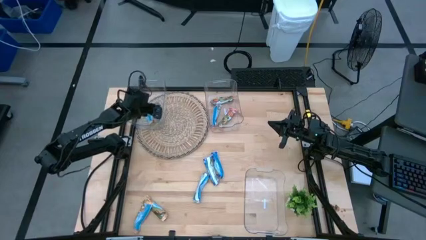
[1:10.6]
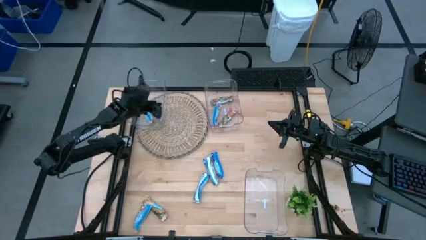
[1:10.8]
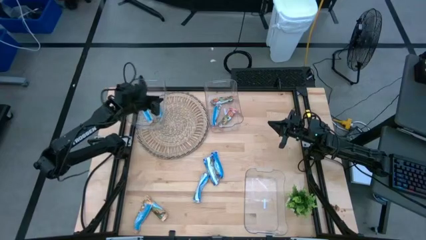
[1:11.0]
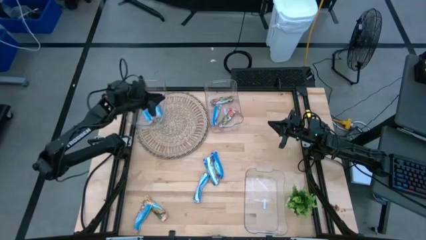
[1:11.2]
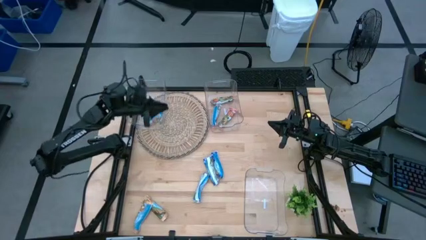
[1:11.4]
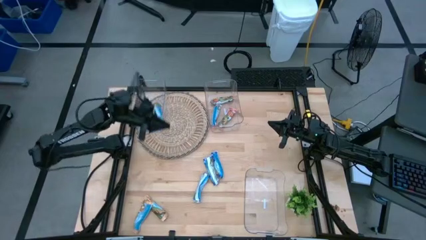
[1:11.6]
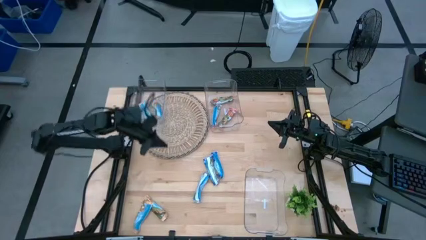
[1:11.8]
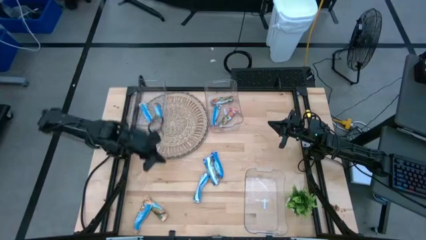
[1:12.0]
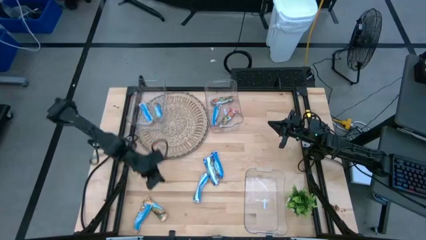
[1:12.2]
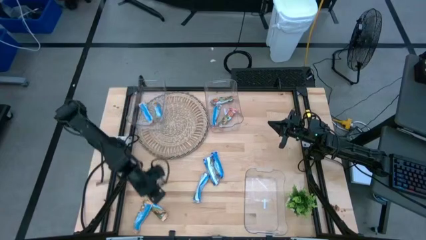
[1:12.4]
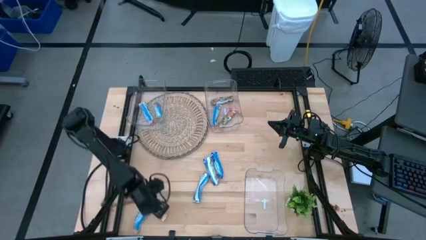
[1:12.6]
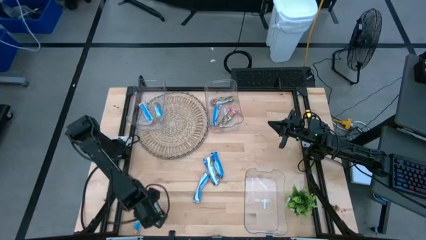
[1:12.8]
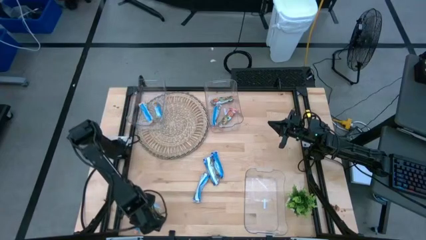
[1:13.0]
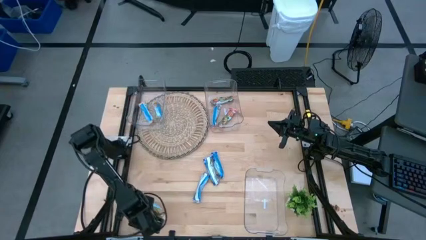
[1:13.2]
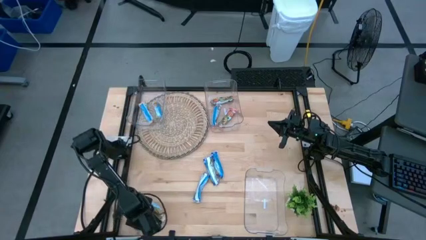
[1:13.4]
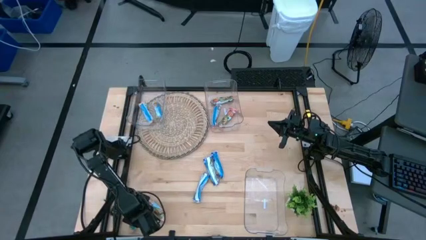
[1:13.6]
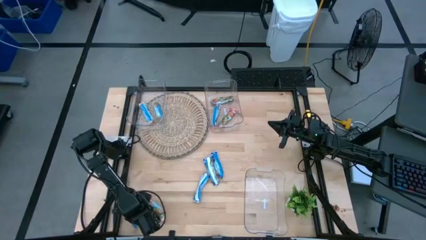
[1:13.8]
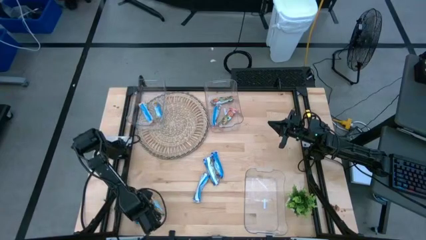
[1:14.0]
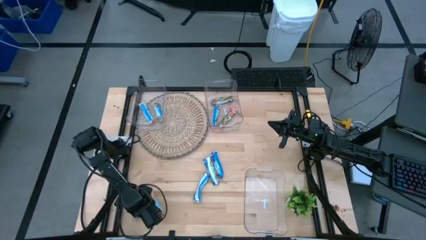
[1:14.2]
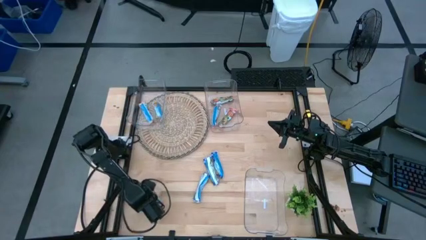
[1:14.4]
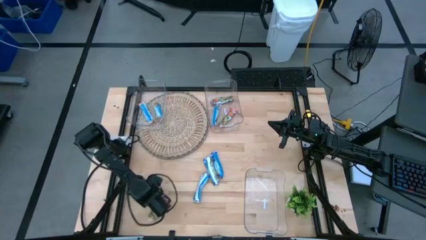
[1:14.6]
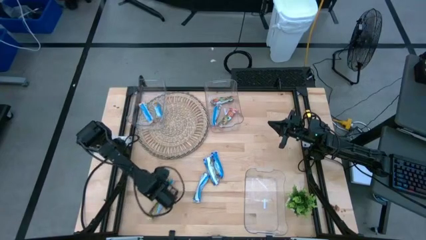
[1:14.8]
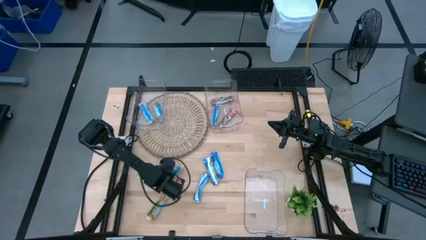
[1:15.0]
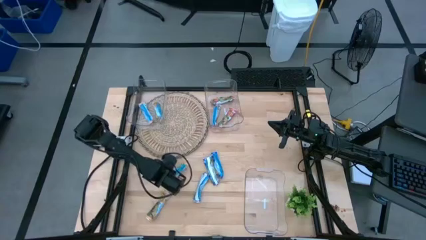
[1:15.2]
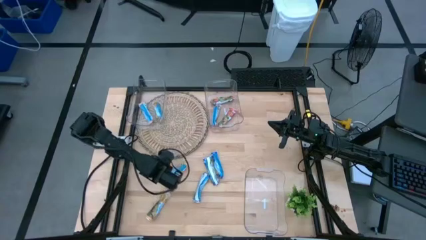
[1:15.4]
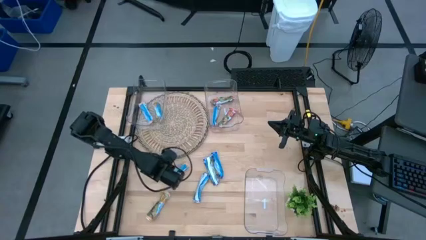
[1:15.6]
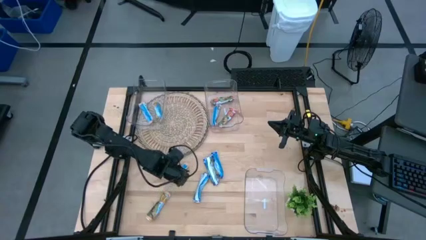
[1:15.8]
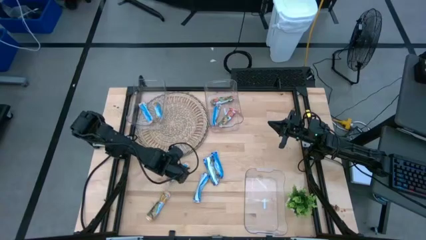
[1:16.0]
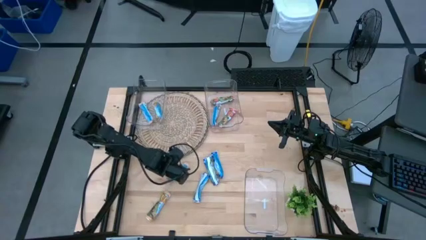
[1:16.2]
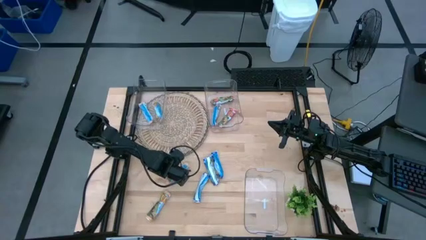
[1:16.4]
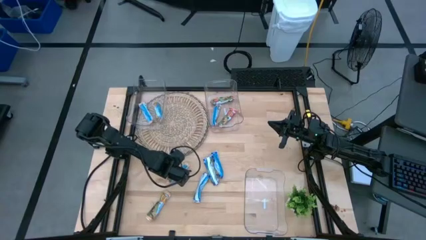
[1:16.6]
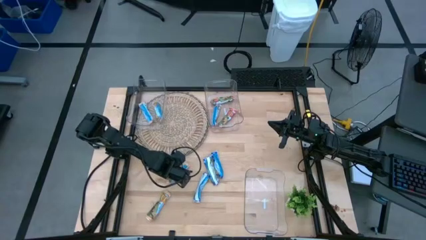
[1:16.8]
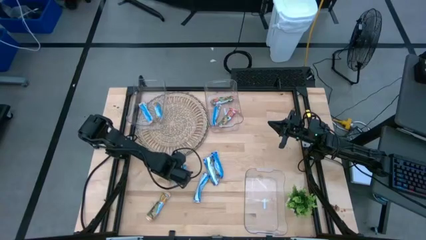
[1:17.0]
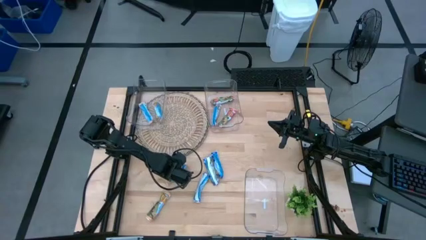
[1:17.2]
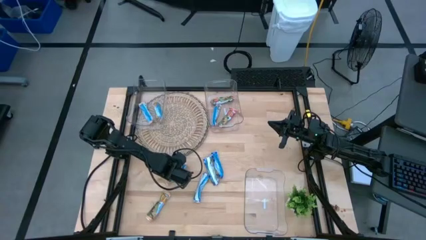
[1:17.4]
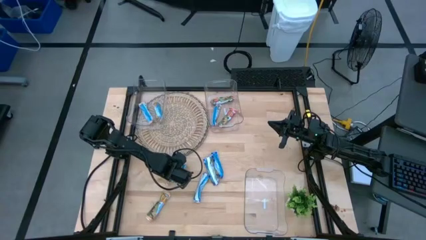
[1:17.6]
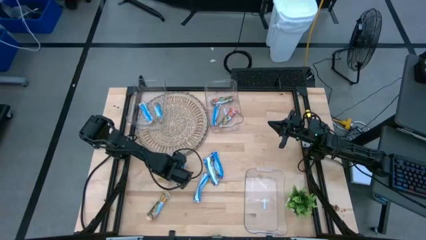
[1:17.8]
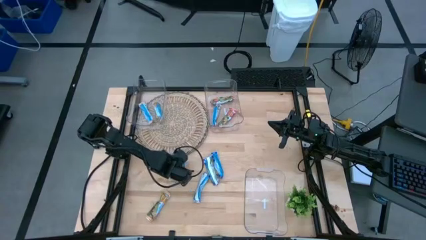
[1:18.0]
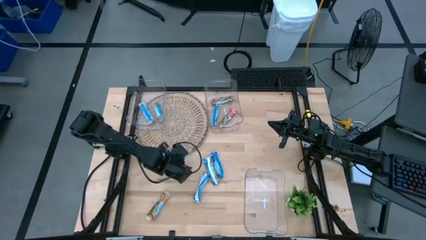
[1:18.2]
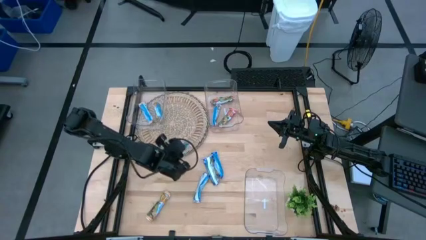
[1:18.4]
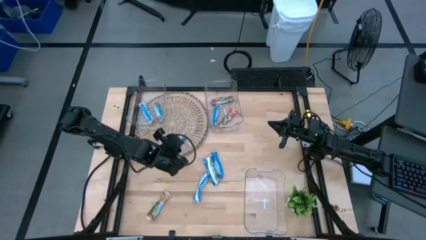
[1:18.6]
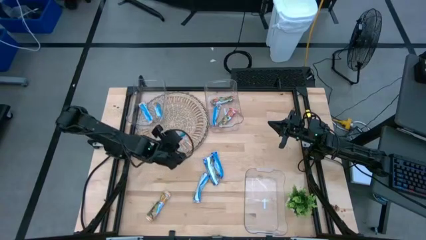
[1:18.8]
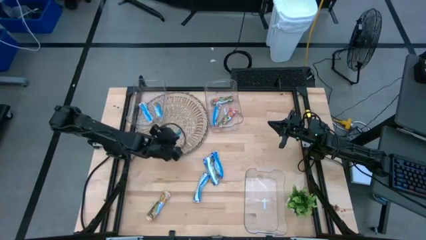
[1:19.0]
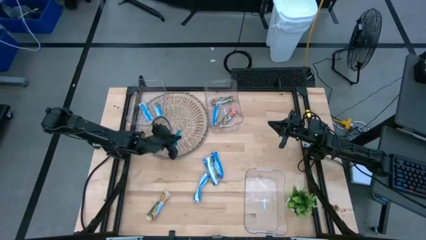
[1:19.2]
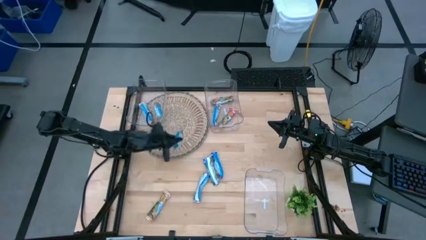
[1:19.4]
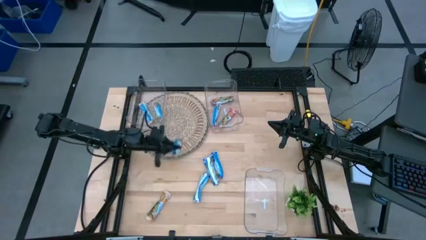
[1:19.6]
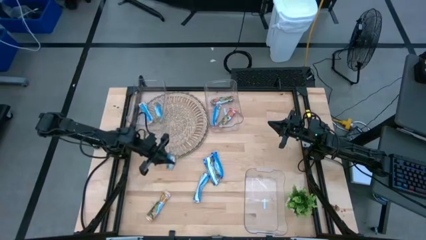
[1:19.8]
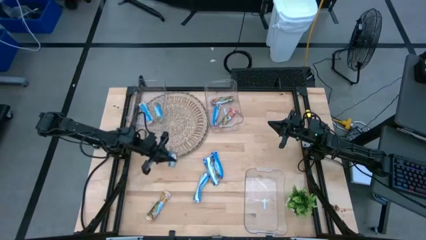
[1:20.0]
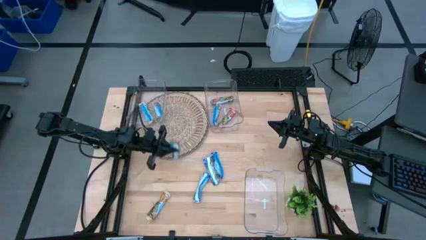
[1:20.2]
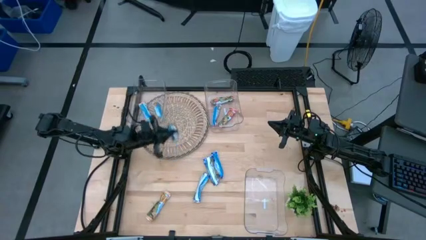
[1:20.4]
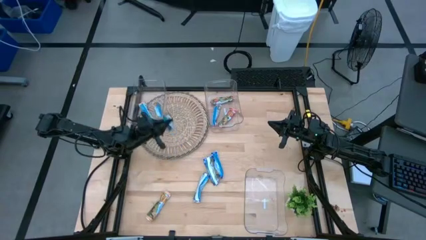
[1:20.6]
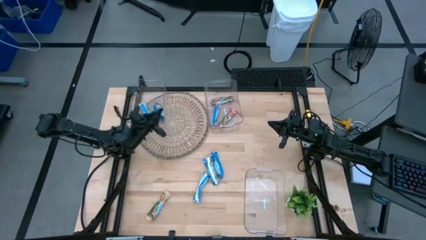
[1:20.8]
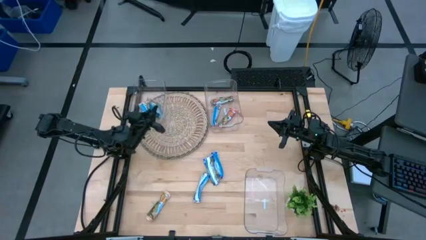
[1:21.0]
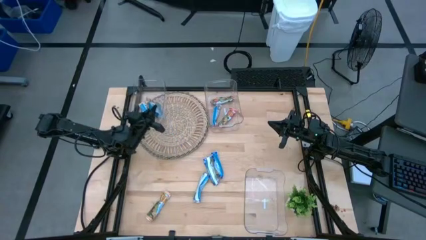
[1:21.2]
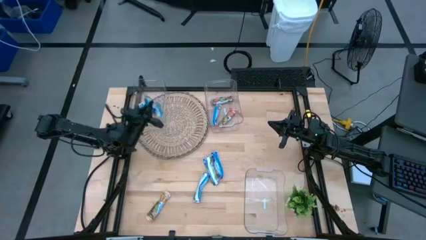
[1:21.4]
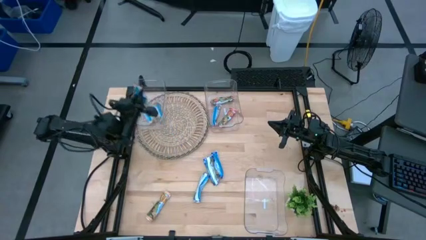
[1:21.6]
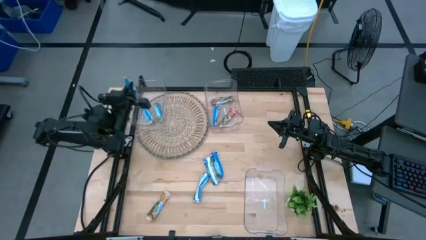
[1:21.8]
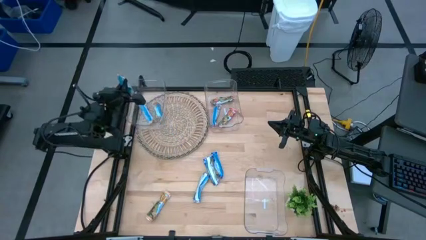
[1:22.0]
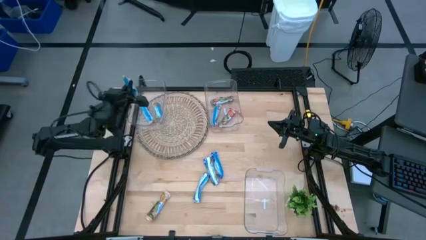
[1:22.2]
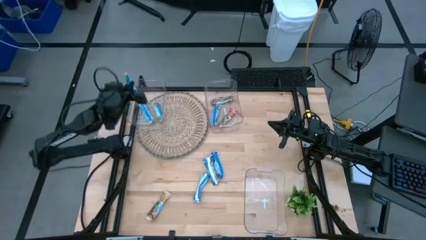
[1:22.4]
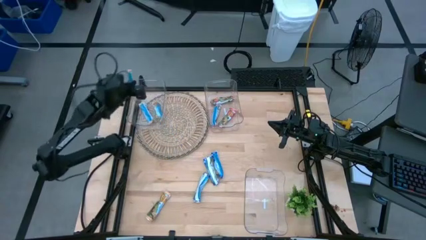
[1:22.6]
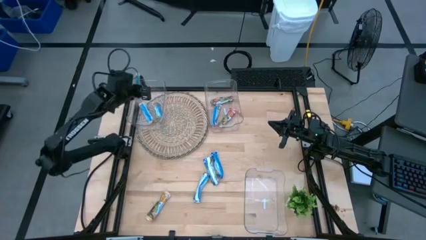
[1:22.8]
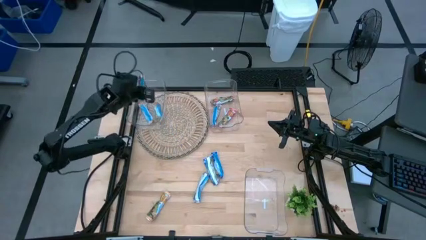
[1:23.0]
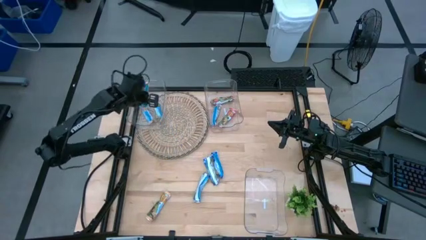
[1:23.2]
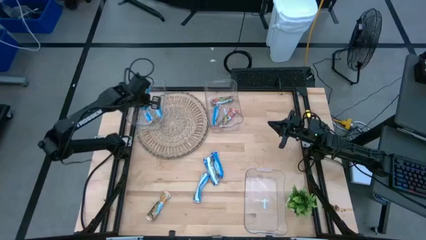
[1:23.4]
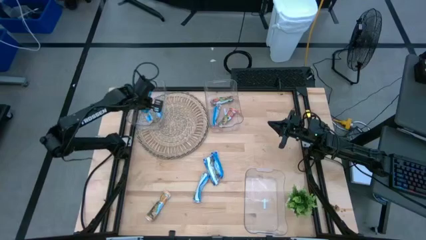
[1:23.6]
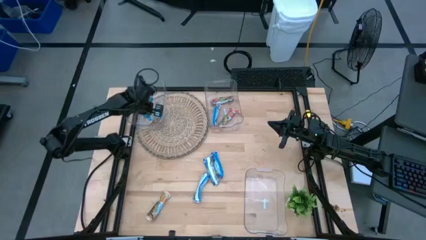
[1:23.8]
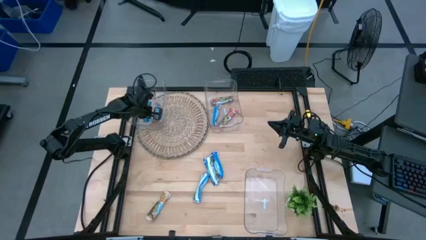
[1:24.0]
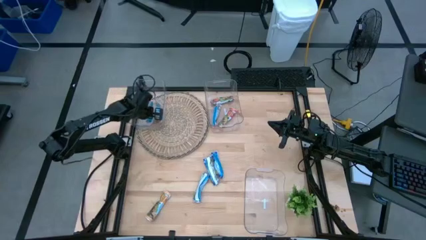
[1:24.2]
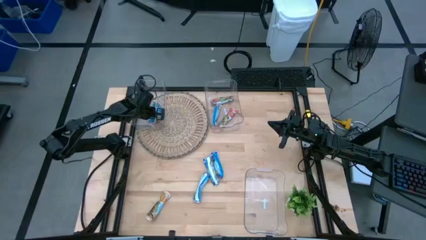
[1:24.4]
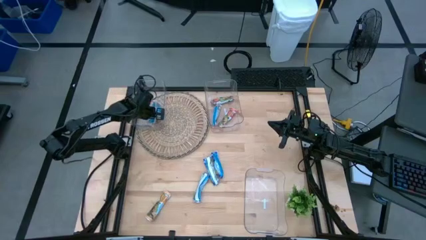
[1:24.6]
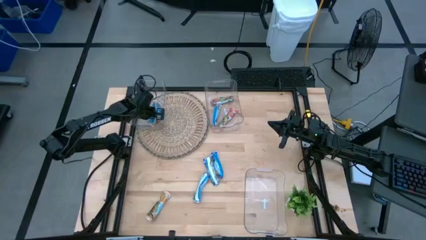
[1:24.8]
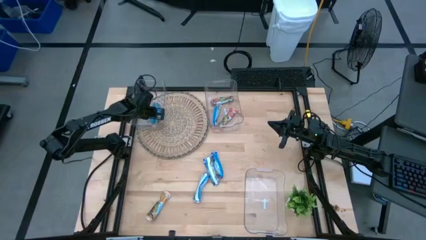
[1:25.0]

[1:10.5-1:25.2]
Task: Pick and place Granola Bars by type
Put the yellow granola bar into the top left transparent bin

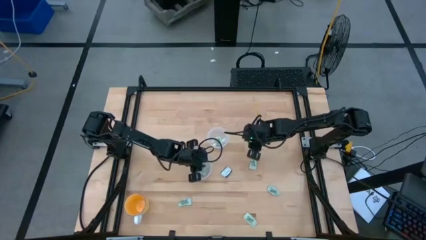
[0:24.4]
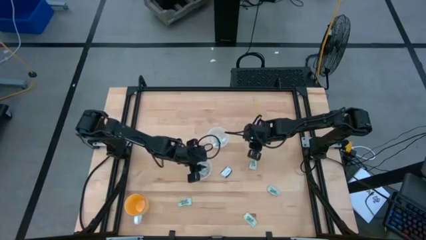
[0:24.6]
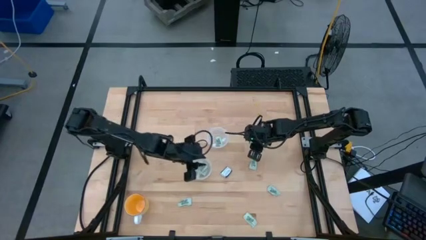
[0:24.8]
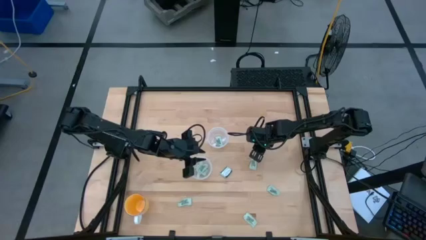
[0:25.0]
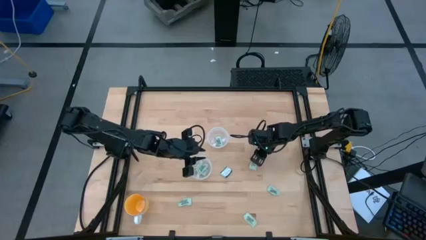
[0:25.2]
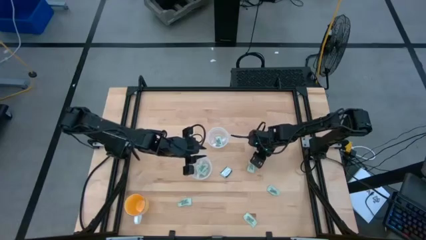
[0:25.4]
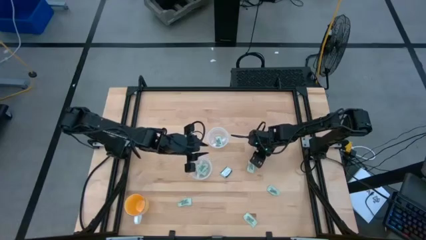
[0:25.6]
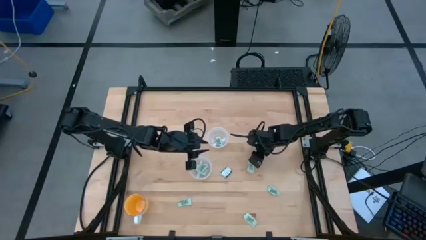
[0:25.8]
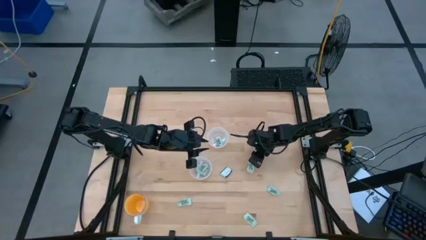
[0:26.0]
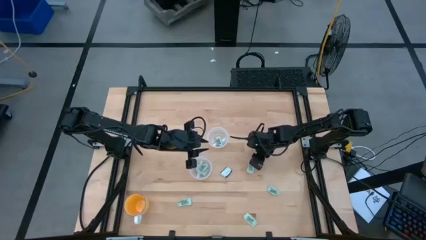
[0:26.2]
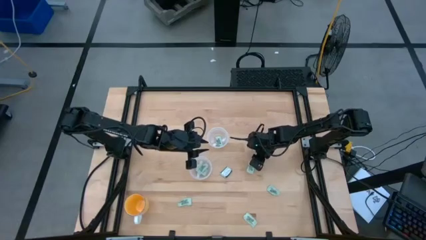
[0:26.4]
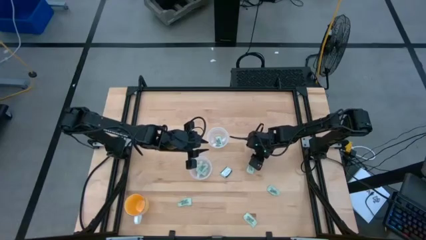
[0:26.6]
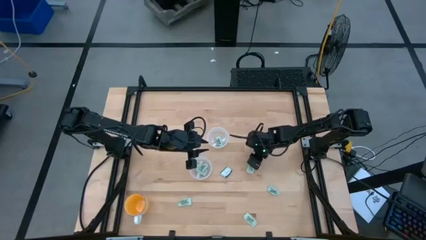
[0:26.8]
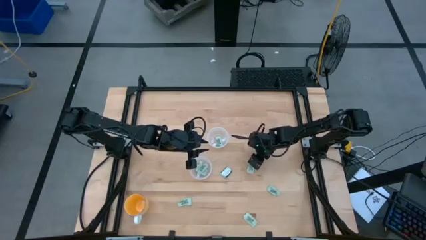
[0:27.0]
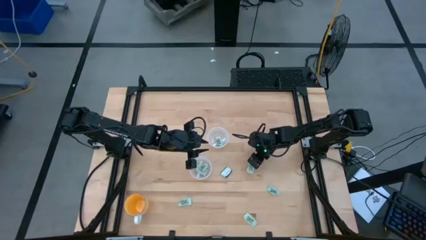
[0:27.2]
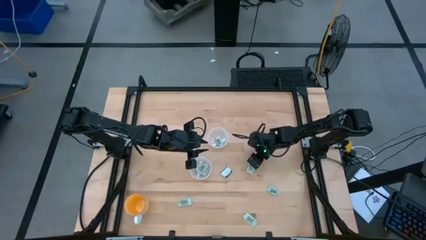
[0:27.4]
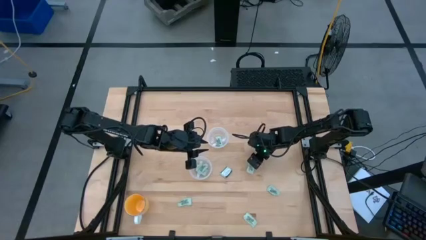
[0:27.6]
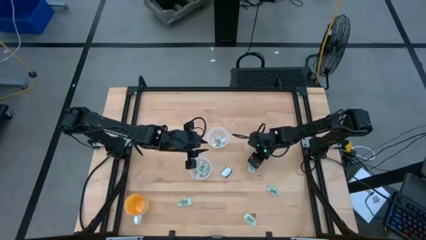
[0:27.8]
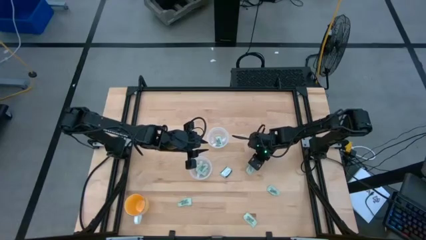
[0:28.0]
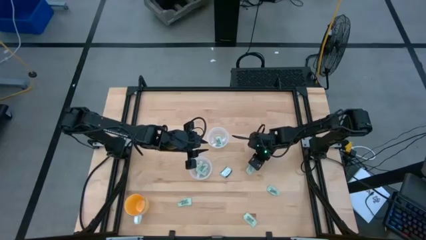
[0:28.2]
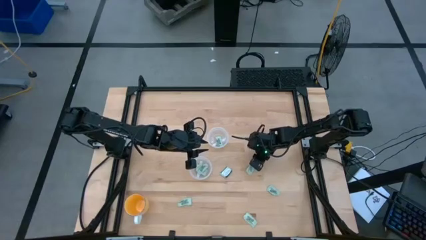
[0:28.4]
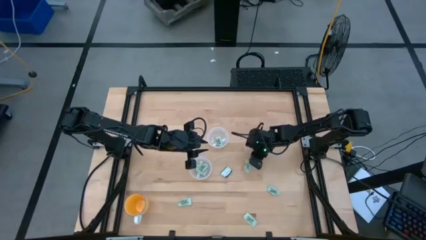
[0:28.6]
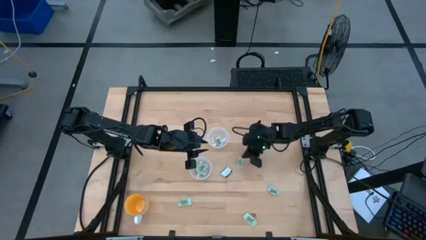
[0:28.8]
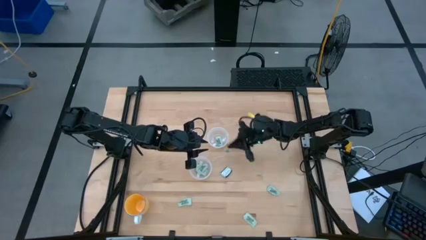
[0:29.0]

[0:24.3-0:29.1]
Task: Pick and place Stevia / Truvia into bins
Put the stevia packet into the top transparent container
